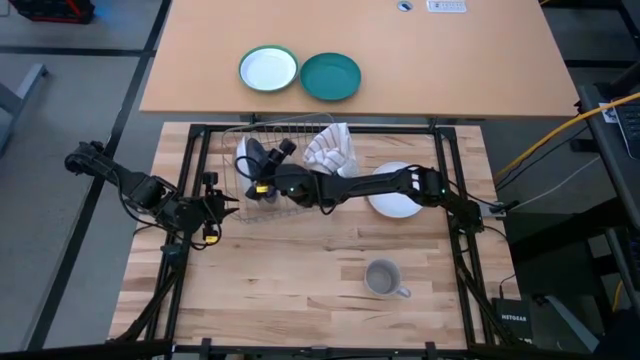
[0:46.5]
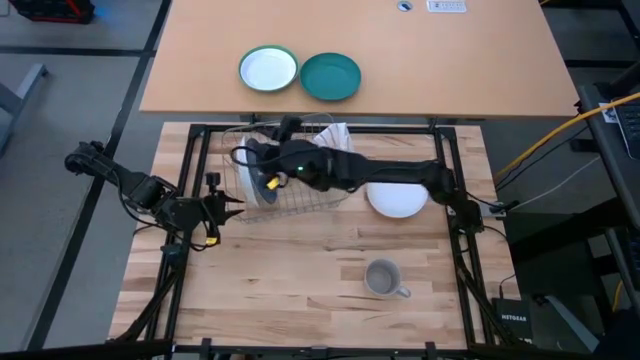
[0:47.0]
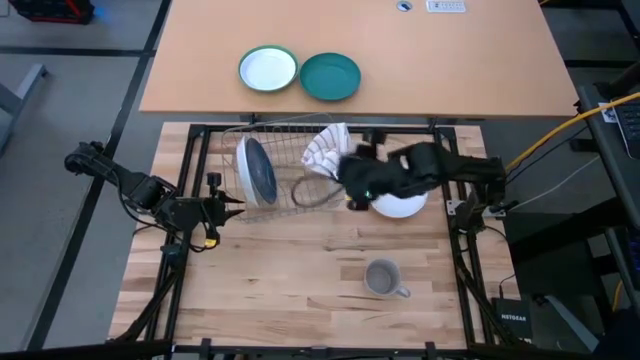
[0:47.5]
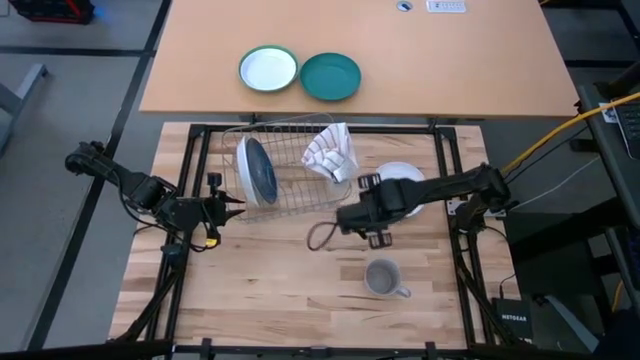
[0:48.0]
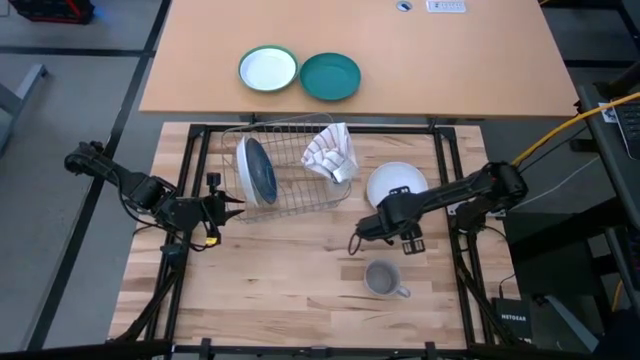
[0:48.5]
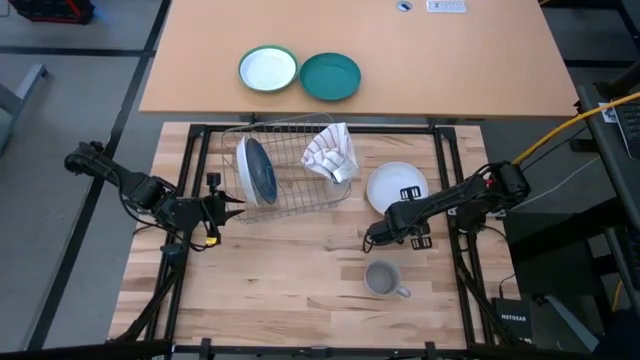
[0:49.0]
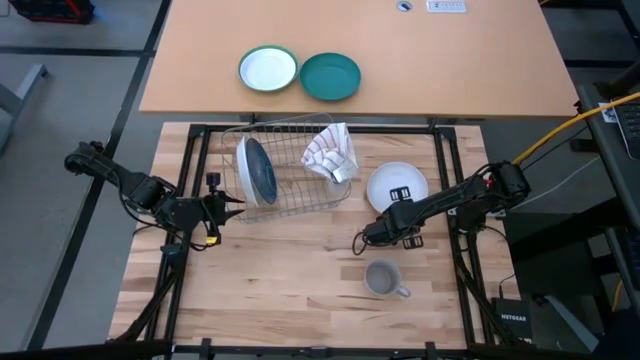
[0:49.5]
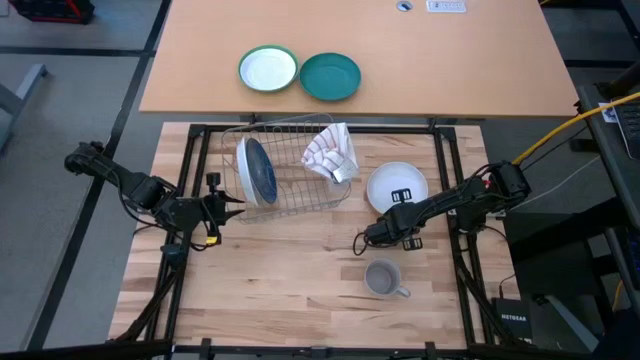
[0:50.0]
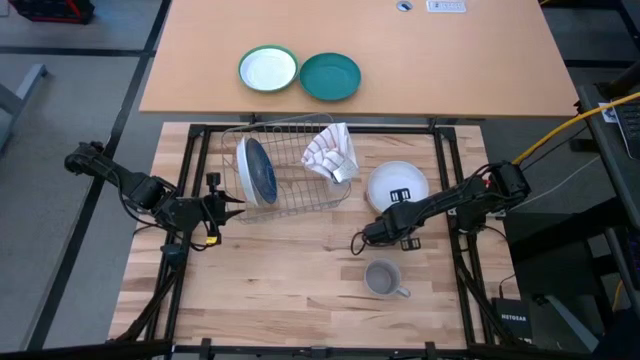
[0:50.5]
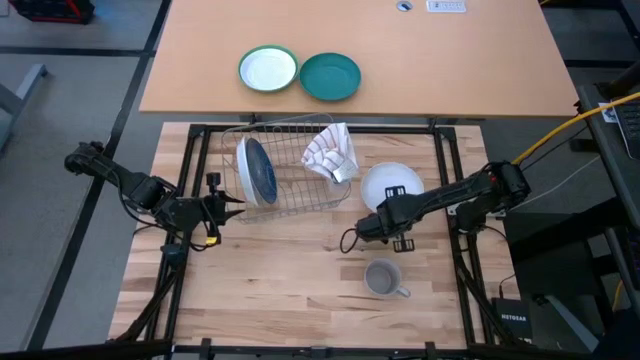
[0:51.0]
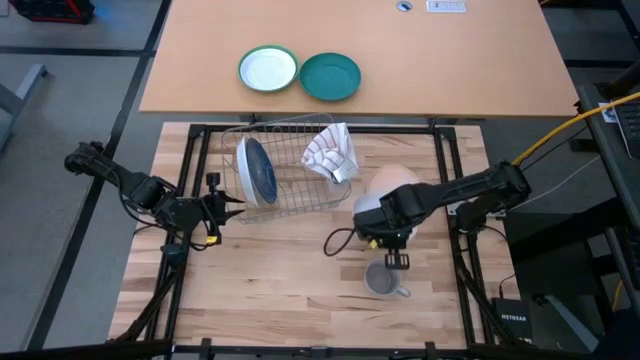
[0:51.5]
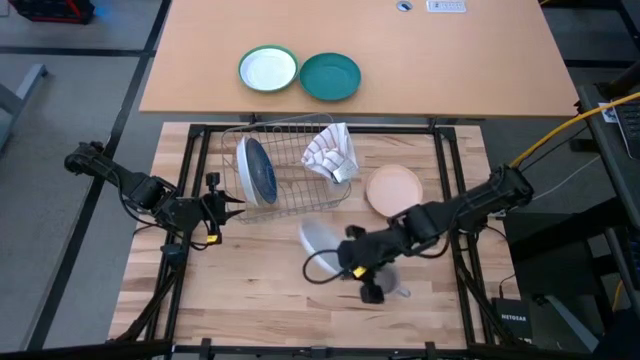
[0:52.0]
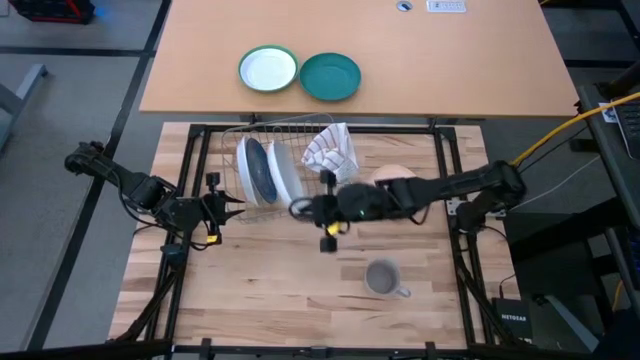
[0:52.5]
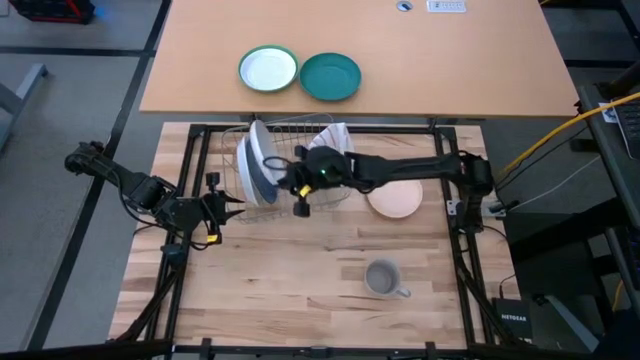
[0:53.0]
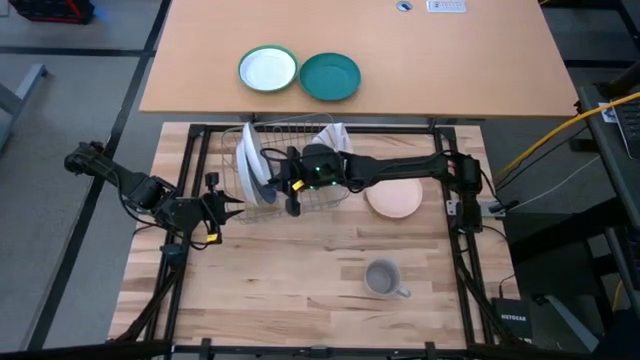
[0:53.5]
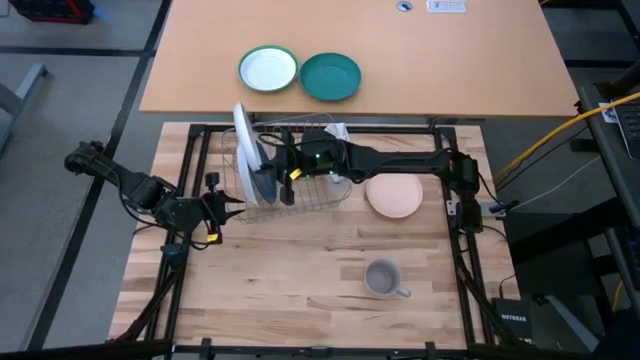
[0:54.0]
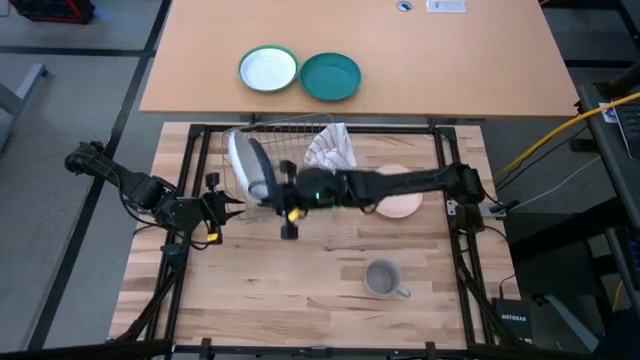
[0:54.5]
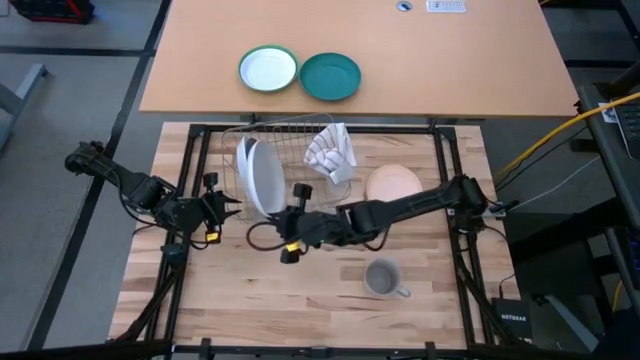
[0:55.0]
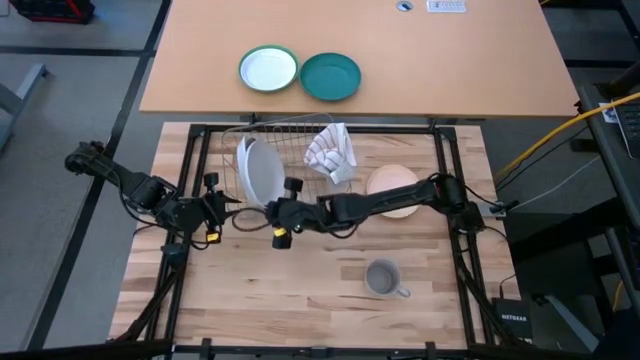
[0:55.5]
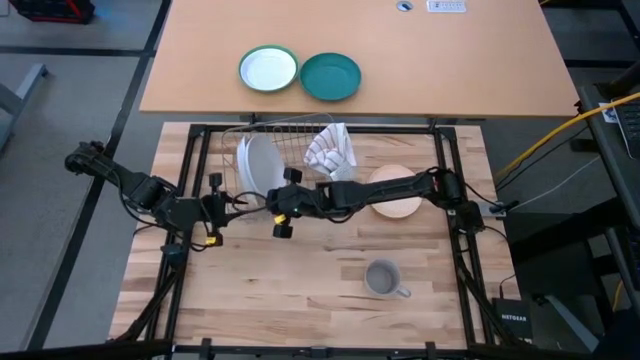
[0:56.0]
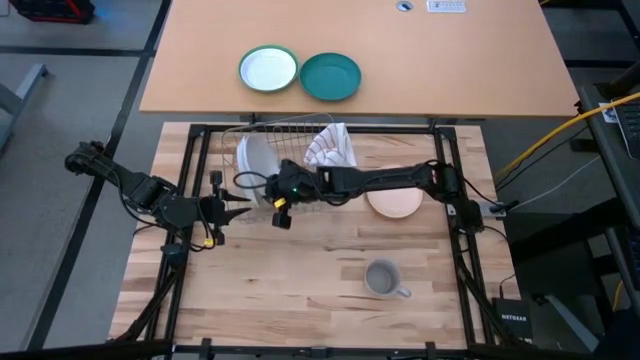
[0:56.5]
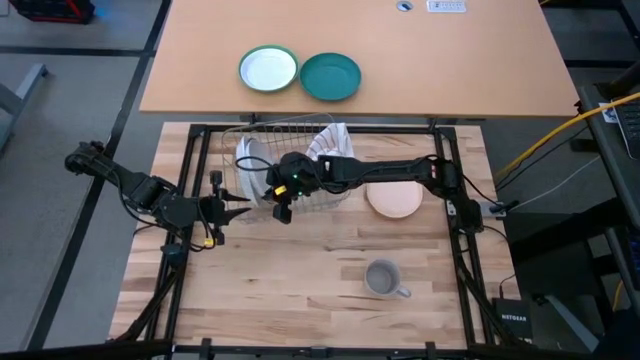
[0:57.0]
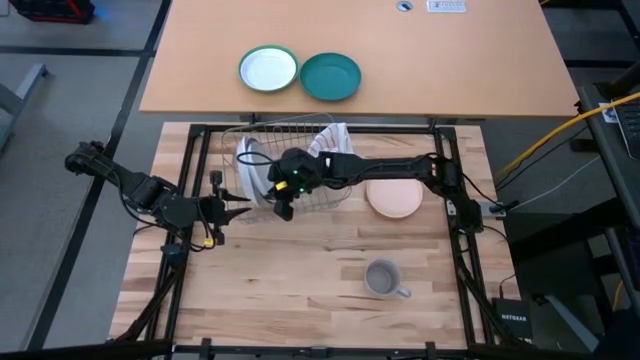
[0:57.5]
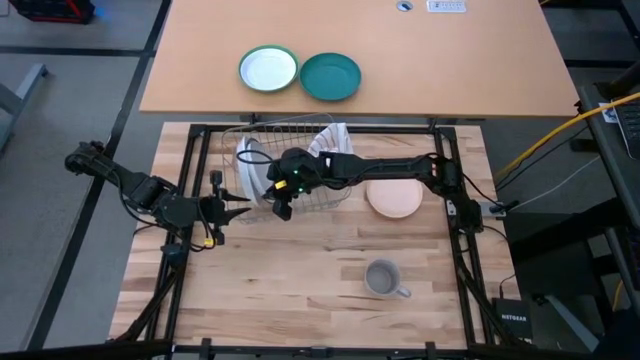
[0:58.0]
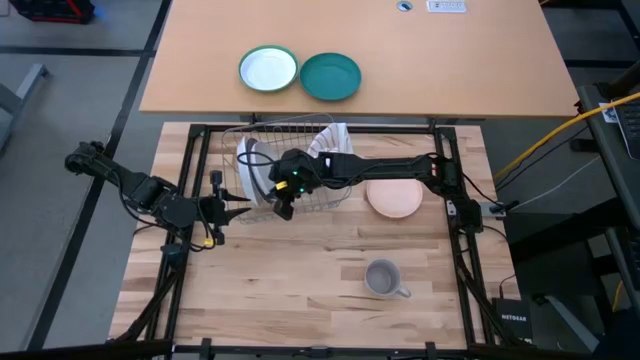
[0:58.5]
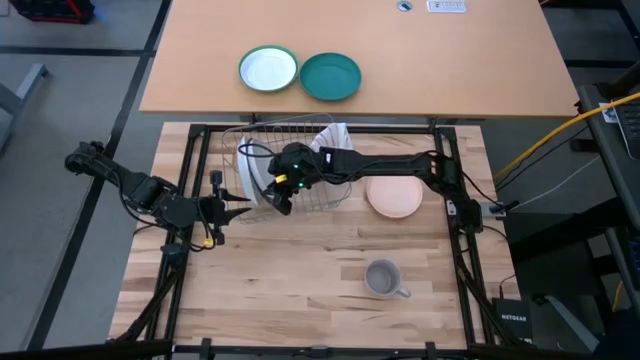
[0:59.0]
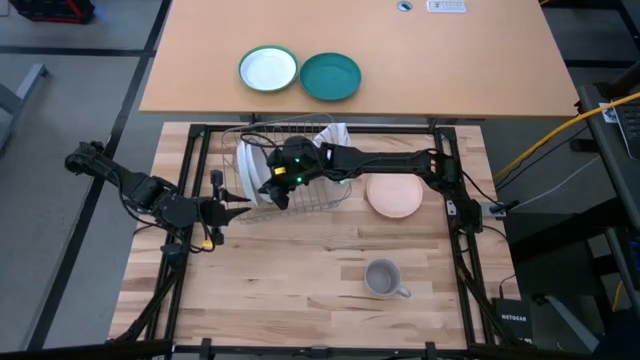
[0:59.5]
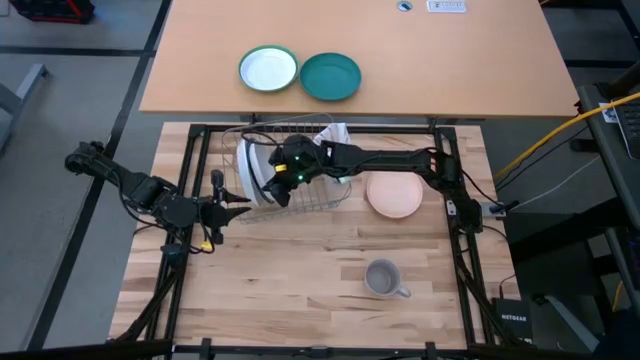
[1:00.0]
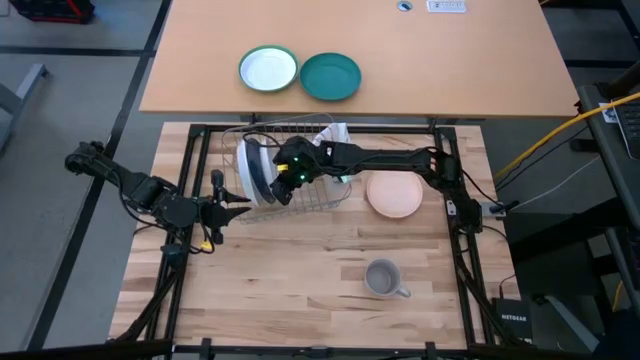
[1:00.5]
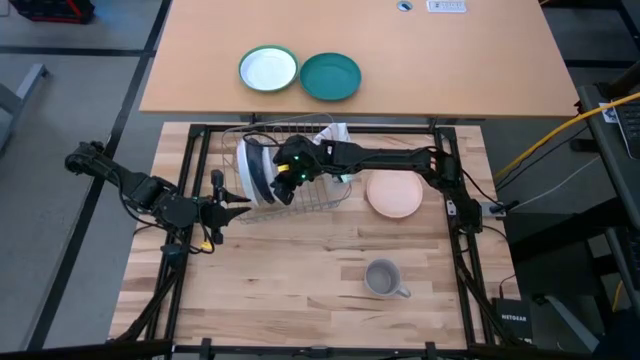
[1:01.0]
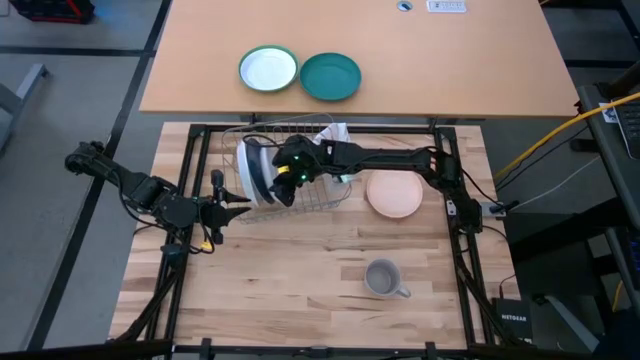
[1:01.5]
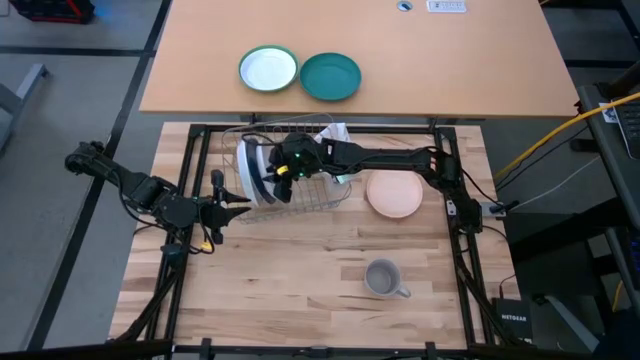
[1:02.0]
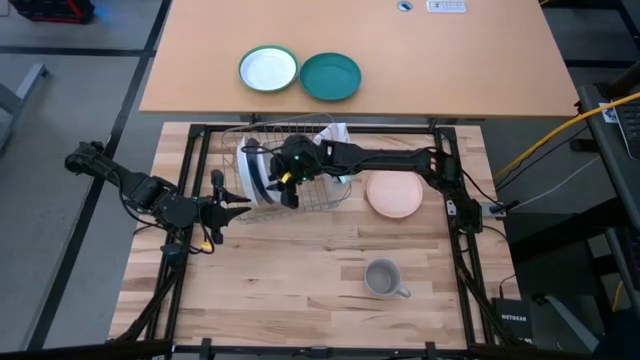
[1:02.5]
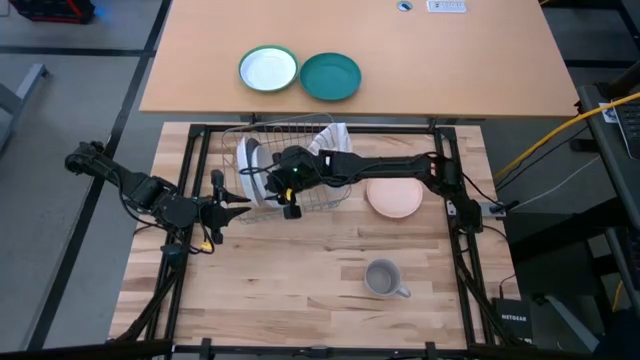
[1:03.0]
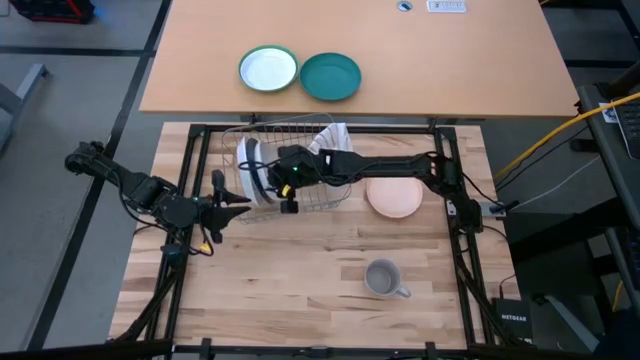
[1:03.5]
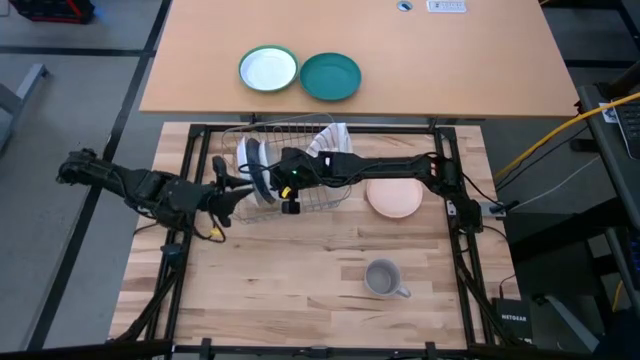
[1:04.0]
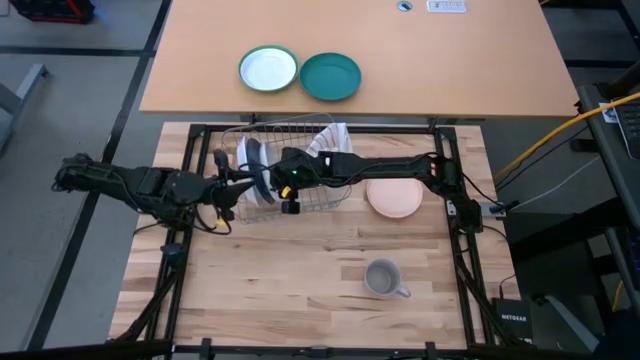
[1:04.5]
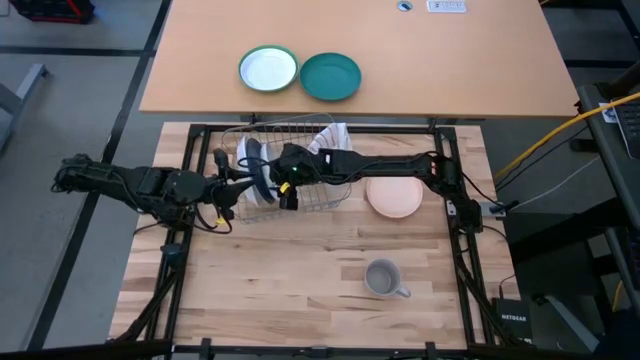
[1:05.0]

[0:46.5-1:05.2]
Task: Sort dishes
Put the white plate in the dish rack

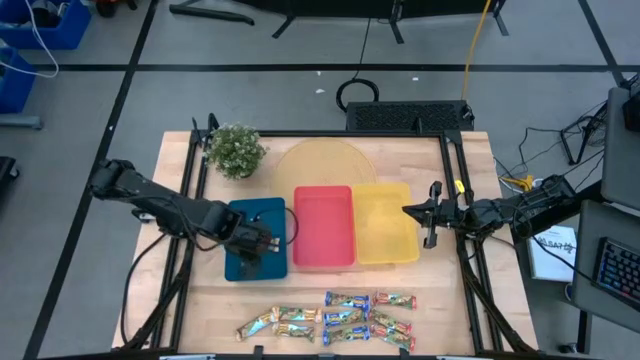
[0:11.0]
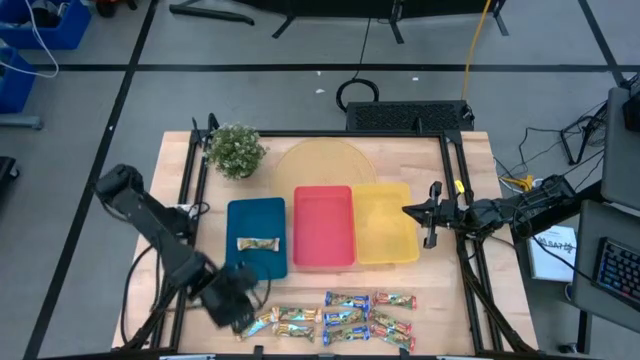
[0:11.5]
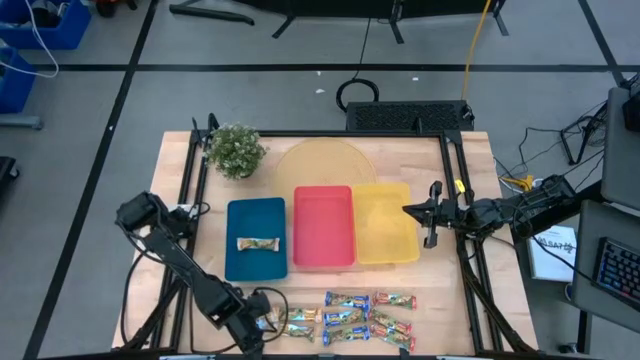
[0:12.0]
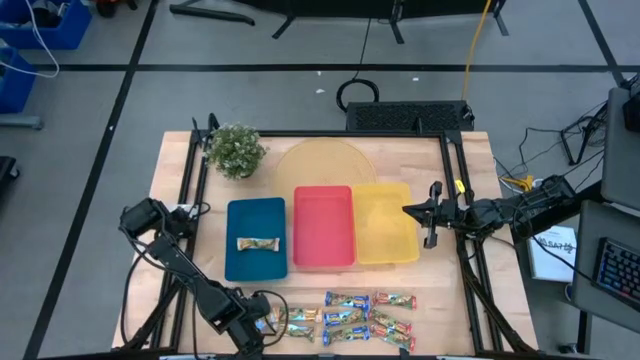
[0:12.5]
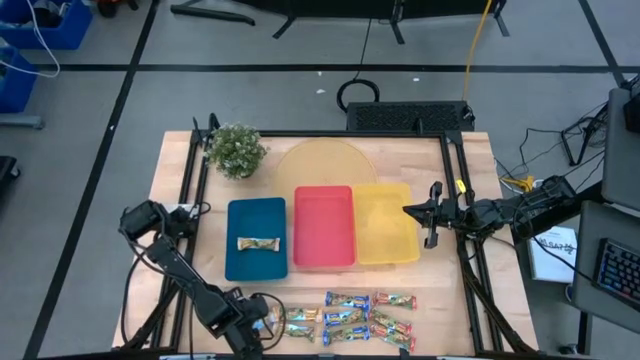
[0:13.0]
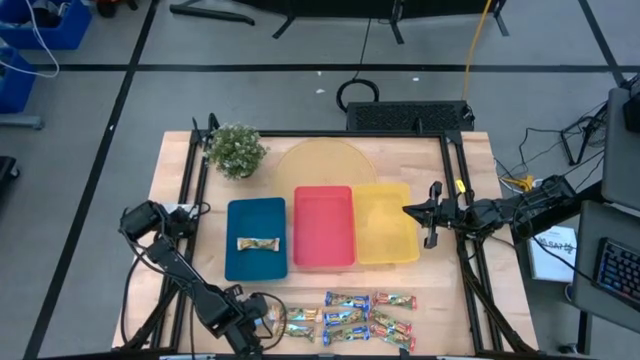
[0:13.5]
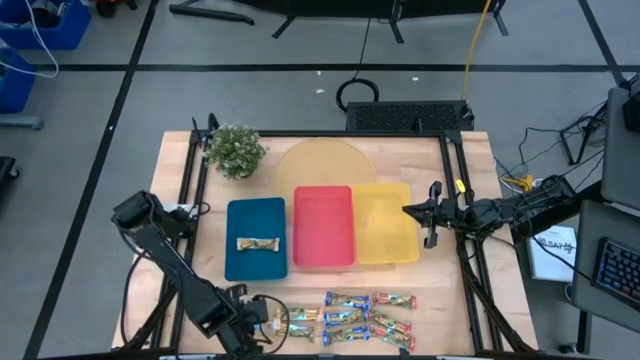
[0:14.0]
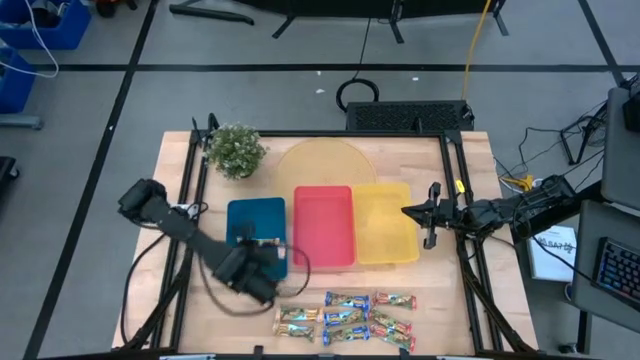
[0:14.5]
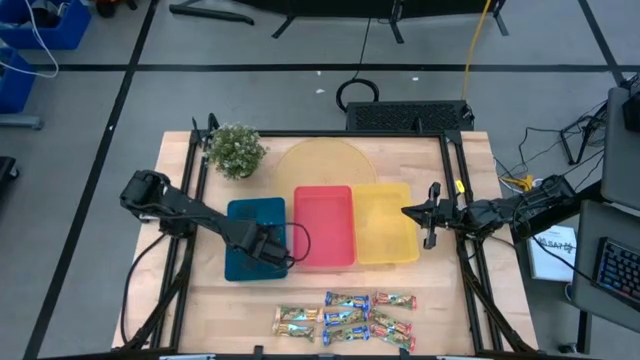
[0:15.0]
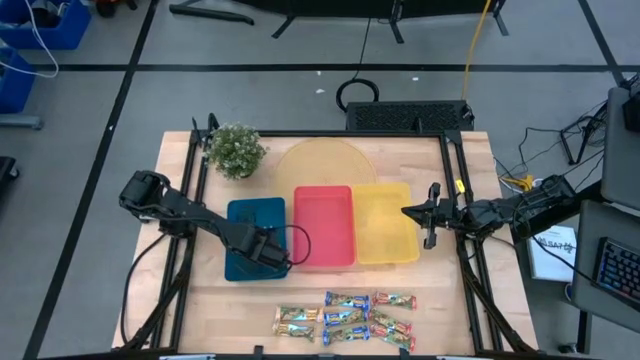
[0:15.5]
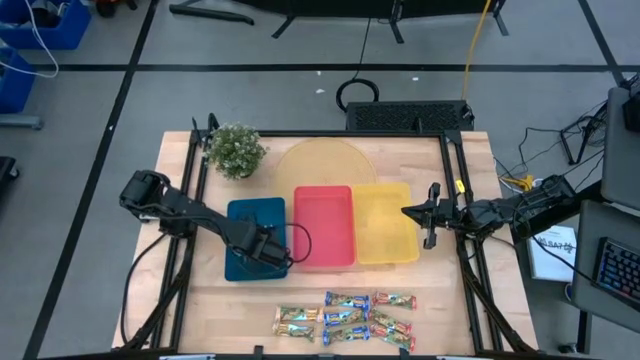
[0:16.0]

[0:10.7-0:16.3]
Task: Pick and place Granola Bars by type
Put the yellow granola bar into the blue bin
